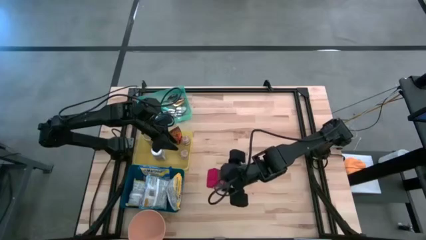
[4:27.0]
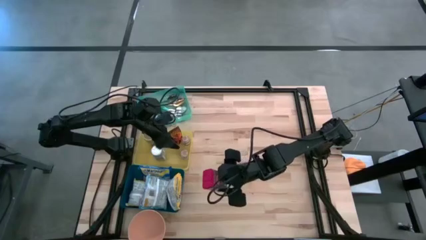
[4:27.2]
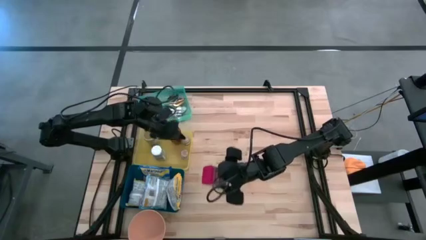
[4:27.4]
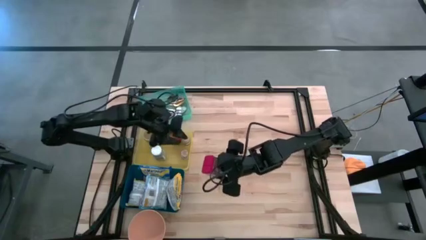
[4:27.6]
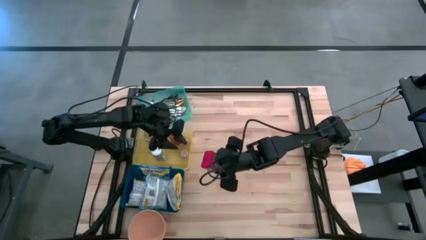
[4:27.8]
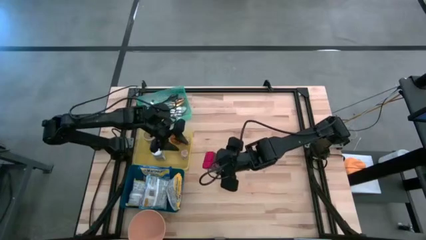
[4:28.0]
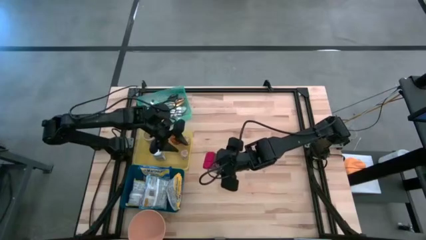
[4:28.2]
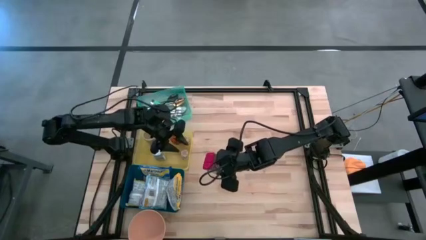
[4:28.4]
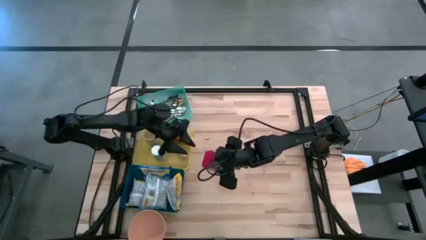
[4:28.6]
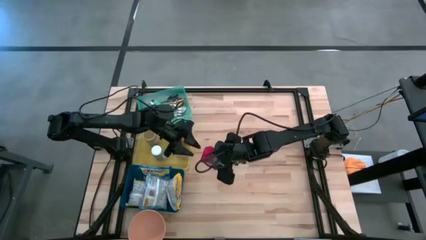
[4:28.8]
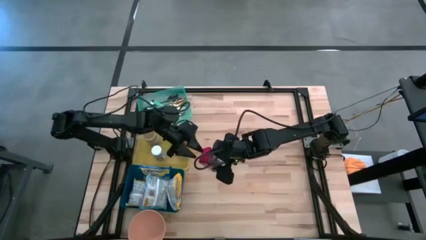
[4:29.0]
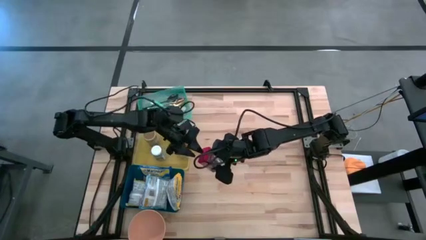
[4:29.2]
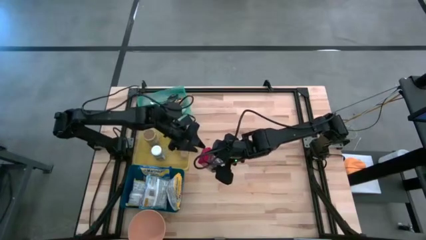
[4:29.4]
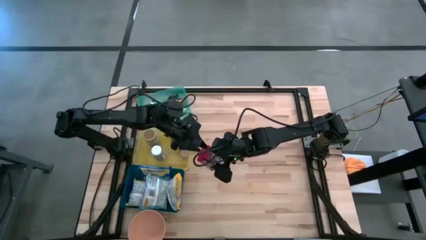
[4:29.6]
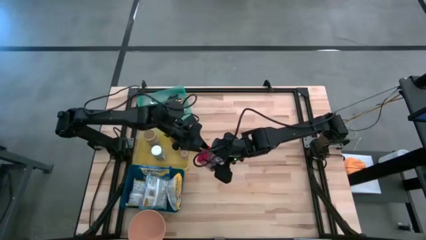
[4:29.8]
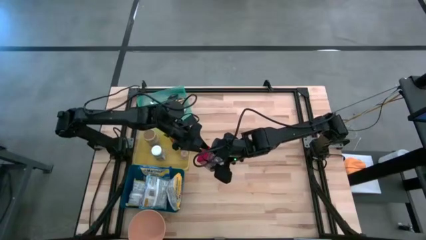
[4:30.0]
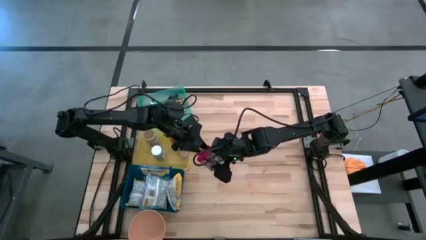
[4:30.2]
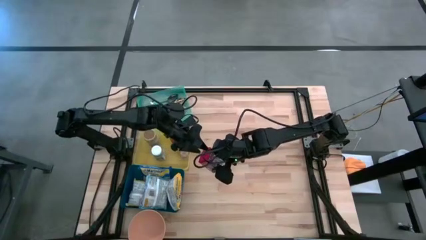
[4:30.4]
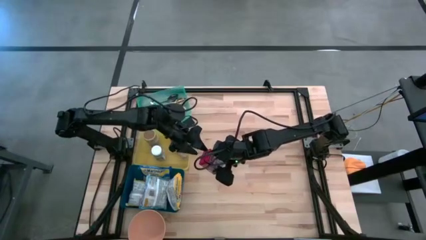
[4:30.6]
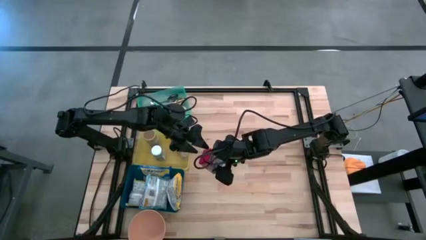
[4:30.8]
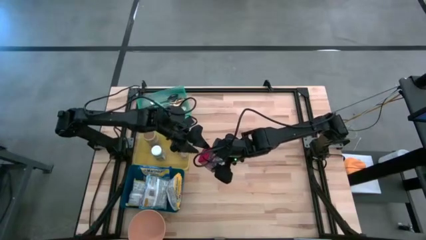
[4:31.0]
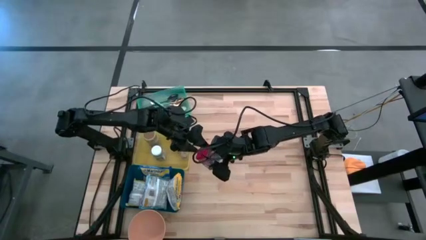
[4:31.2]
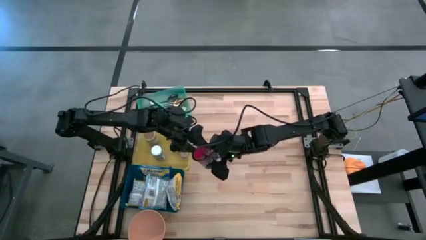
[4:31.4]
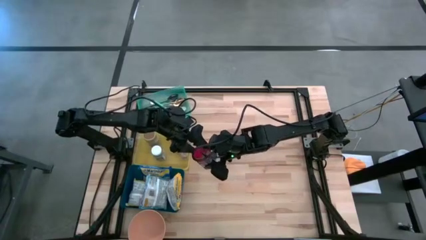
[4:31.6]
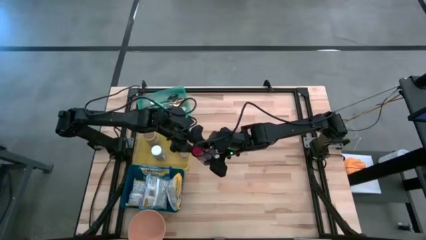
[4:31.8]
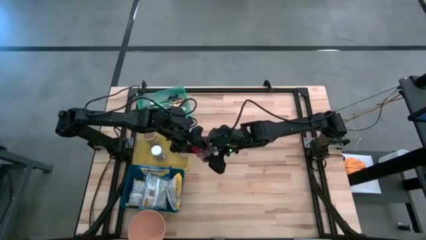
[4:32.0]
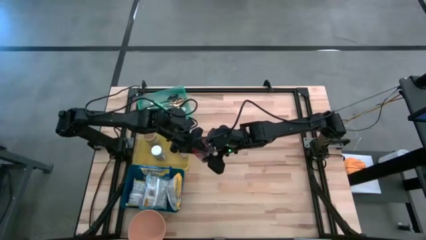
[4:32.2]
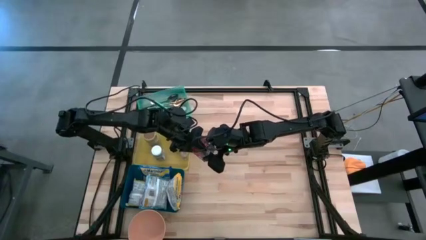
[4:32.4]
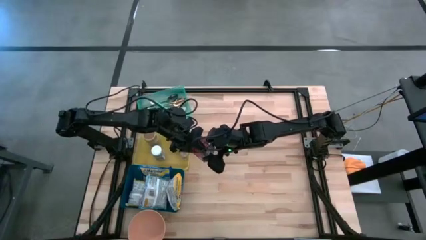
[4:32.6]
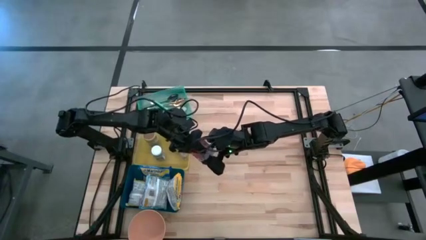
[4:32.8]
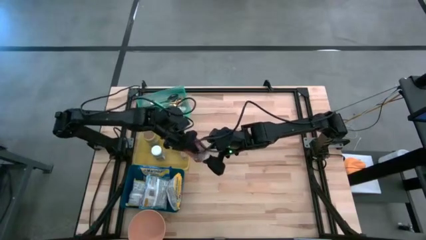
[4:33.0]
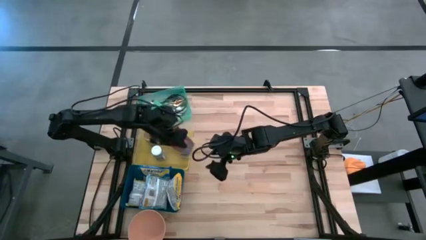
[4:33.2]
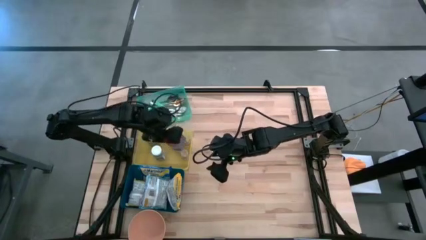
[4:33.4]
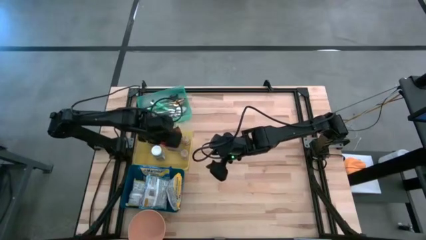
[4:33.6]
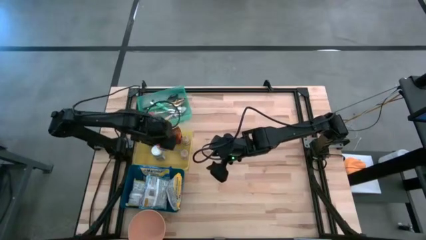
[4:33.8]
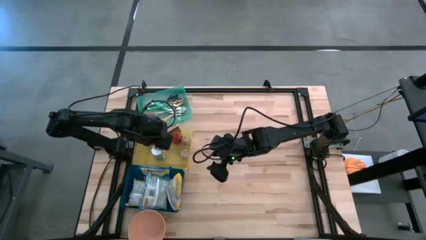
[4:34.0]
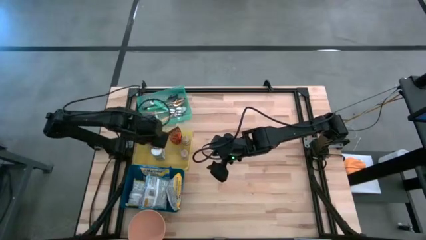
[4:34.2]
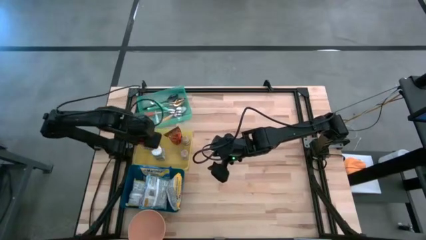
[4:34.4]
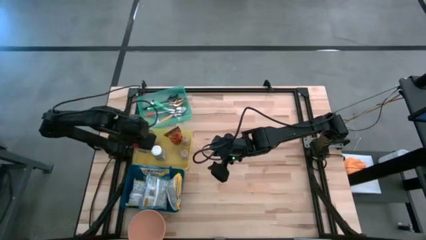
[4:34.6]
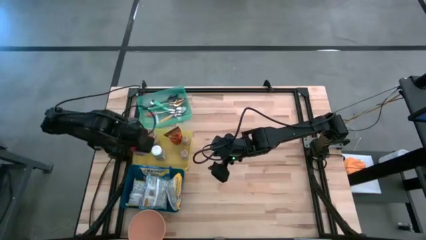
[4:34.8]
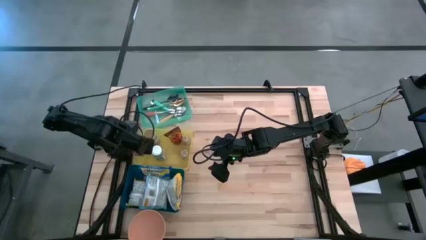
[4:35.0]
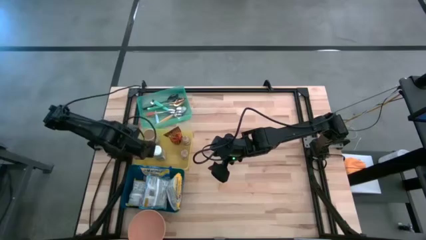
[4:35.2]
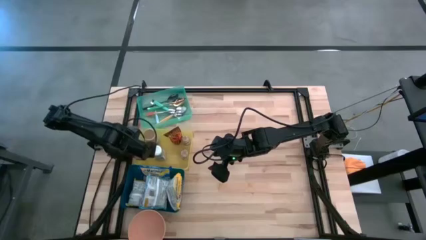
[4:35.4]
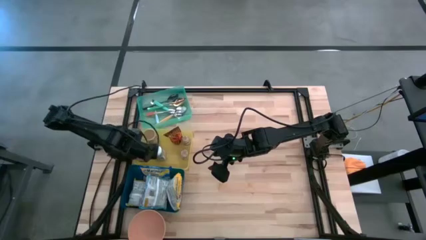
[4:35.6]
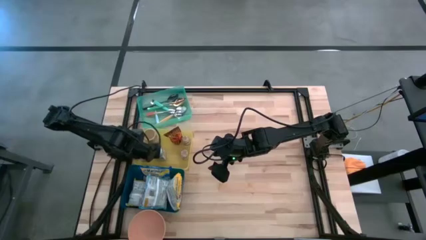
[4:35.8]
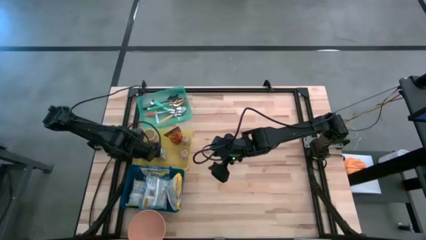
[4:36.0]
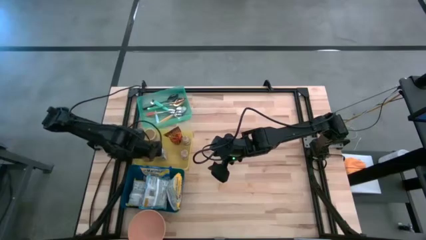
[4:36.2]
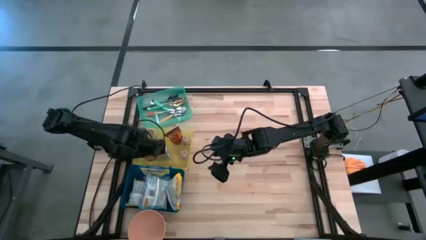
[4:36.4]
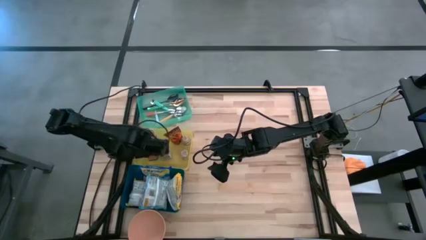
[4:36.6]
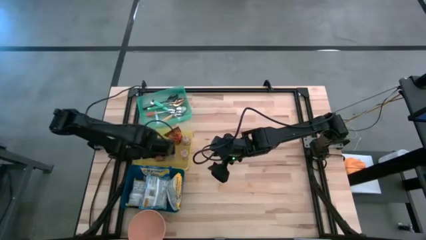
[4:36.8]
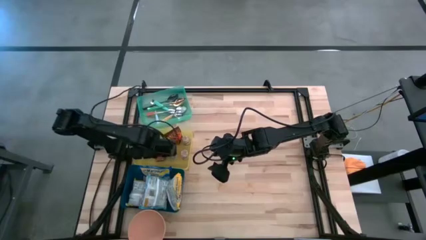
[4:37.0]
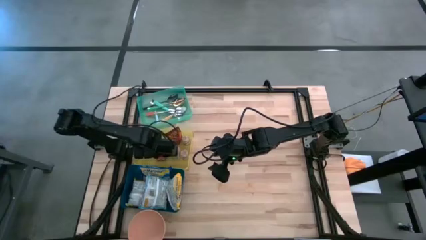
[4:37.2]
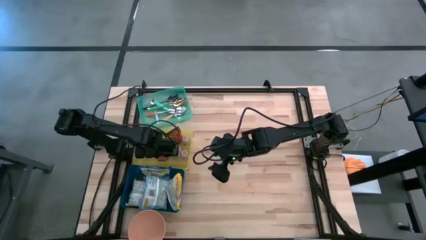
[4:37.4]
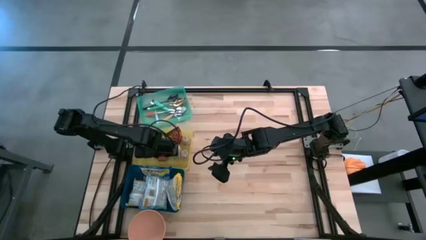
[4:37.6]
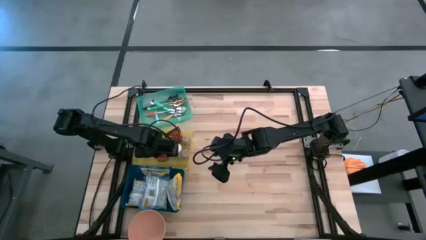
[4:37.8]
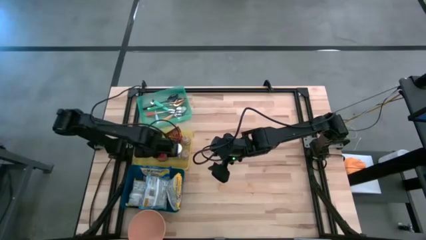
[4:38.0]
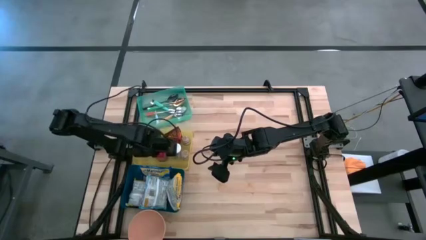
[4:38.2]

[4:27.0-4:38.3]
Put the red seasoning can into the yellow bin
